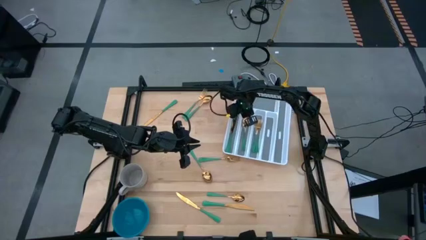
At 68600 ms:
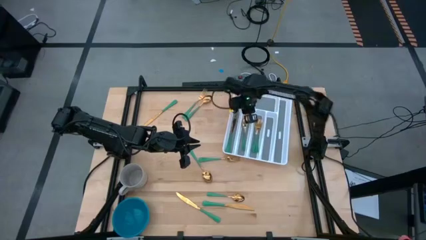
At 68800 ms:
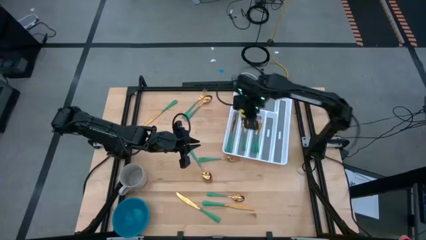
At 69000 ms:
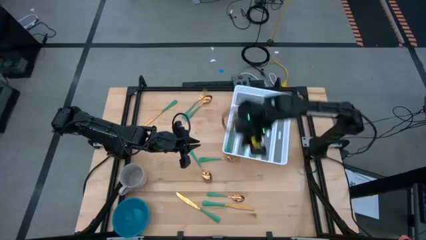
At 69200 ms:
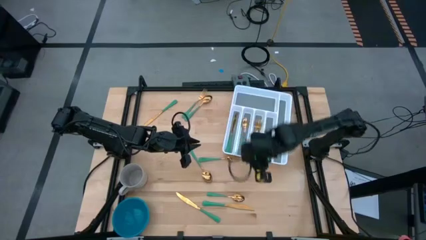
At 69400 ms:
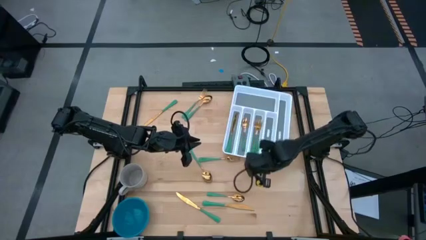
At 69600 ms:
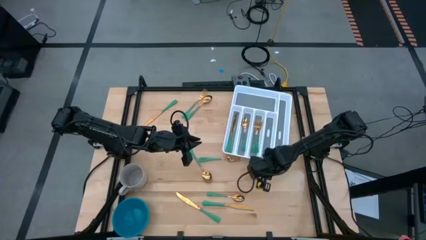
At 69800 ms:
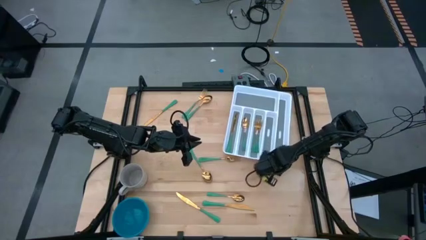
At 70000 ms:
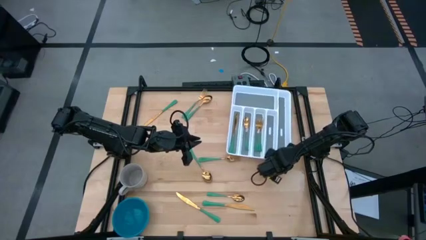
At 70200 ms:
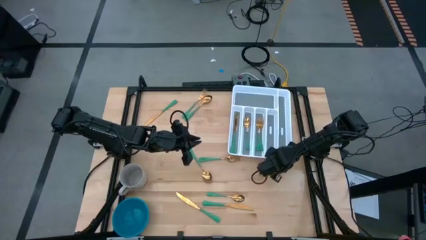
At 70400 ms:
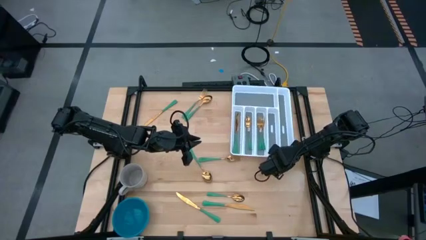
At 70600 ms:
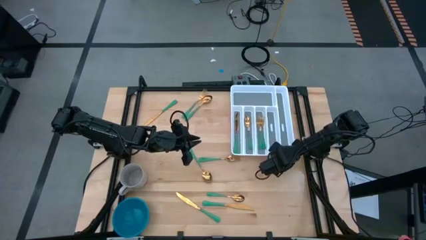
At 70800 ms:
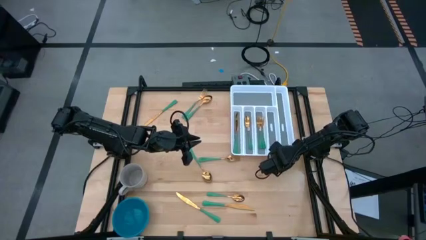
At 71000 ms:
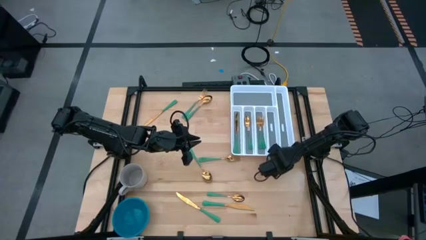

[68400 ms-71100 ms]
Task: Sort silverware
Adjust the white cutlery tray

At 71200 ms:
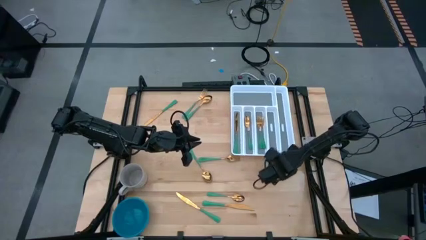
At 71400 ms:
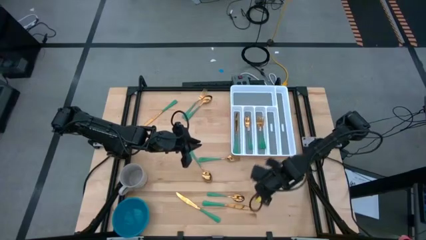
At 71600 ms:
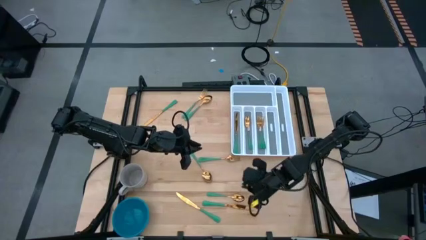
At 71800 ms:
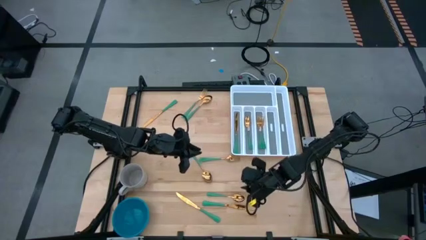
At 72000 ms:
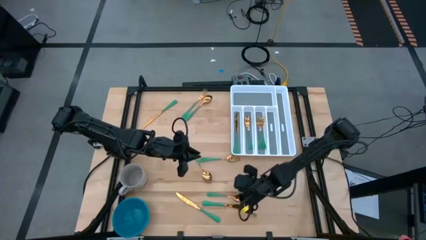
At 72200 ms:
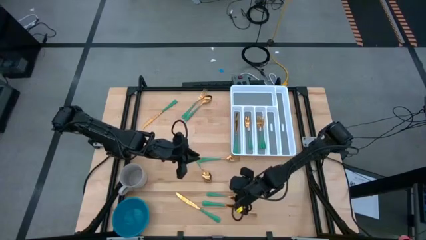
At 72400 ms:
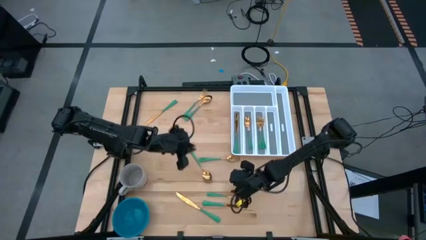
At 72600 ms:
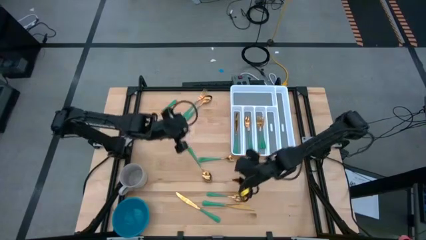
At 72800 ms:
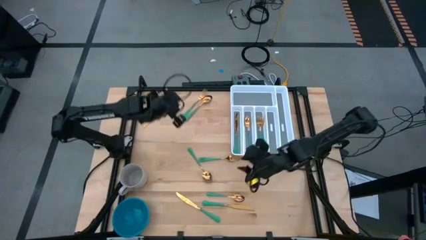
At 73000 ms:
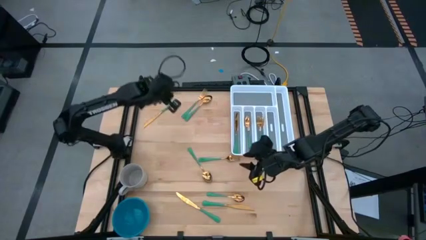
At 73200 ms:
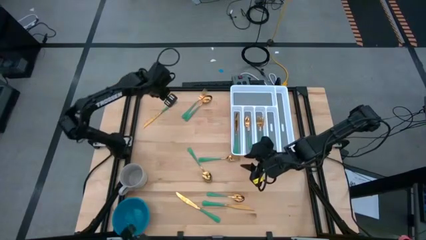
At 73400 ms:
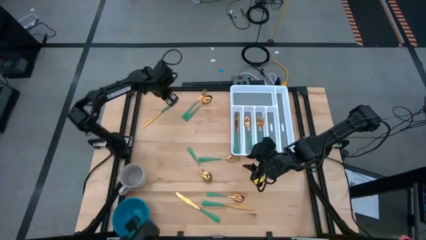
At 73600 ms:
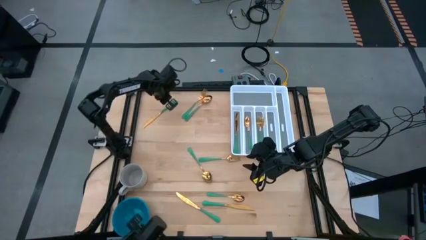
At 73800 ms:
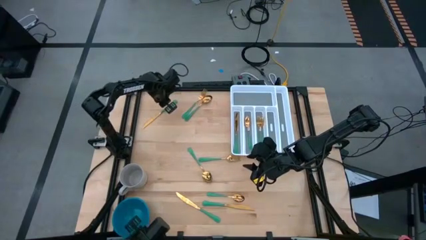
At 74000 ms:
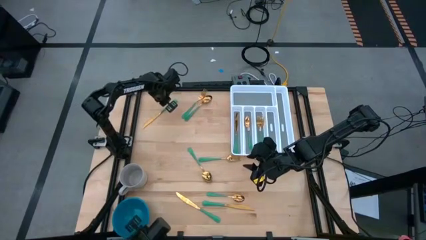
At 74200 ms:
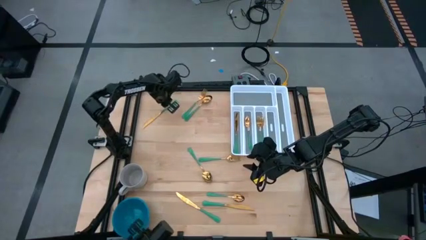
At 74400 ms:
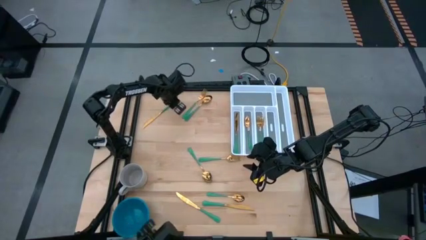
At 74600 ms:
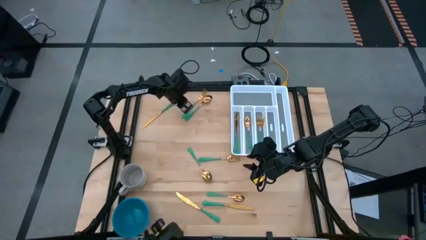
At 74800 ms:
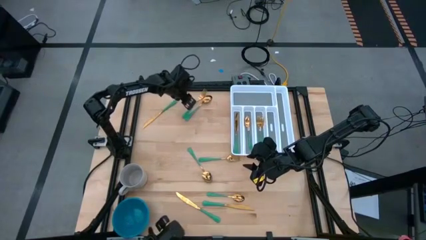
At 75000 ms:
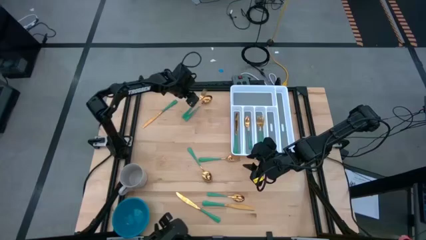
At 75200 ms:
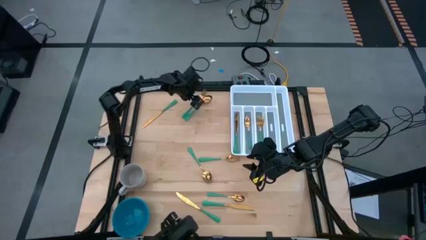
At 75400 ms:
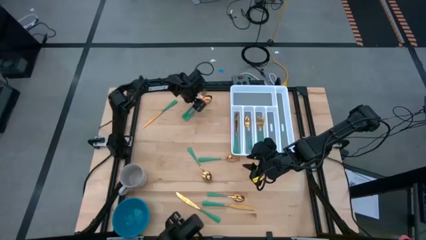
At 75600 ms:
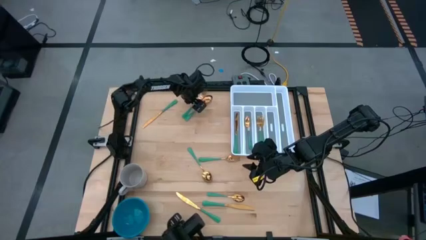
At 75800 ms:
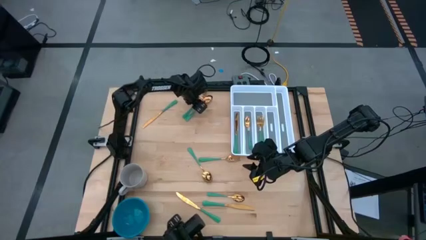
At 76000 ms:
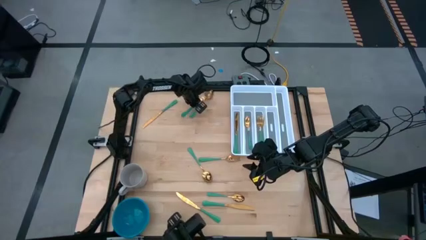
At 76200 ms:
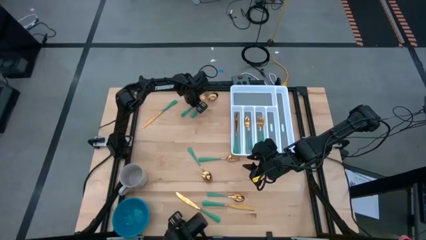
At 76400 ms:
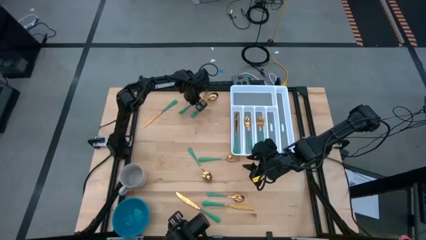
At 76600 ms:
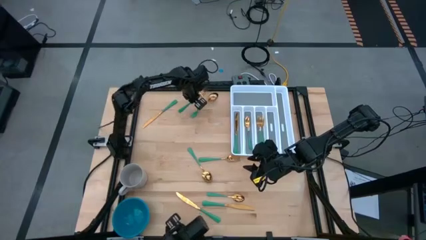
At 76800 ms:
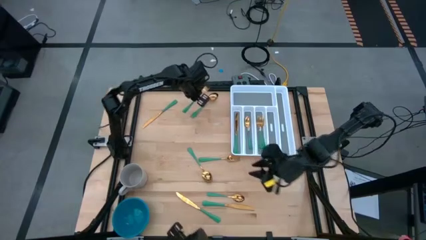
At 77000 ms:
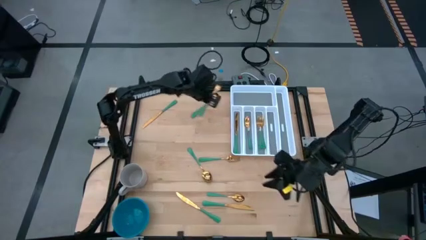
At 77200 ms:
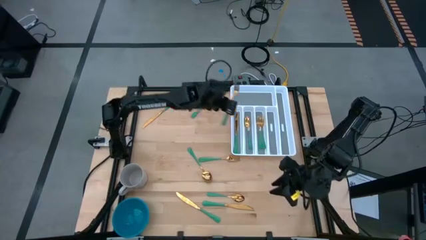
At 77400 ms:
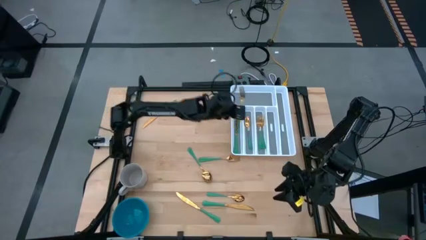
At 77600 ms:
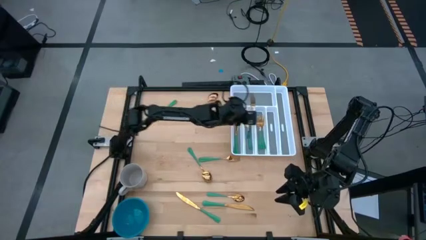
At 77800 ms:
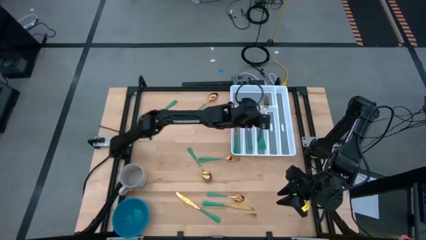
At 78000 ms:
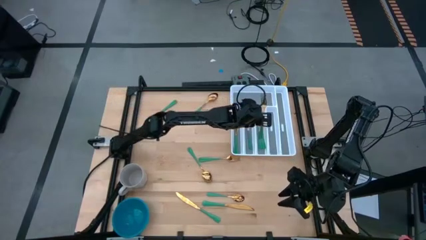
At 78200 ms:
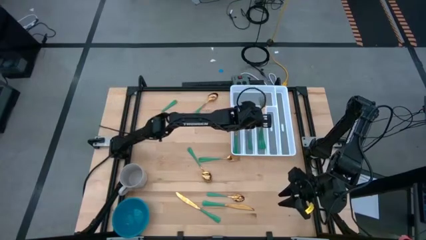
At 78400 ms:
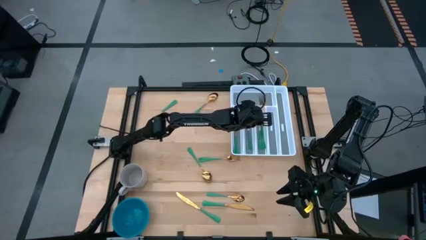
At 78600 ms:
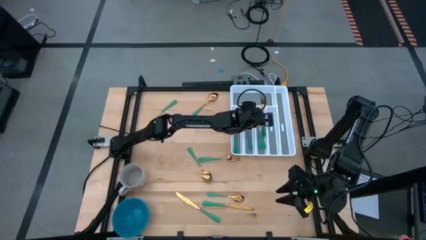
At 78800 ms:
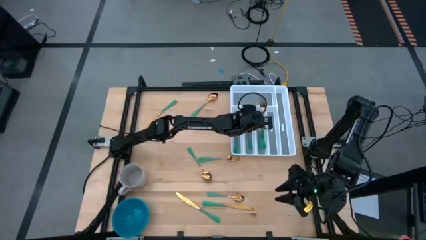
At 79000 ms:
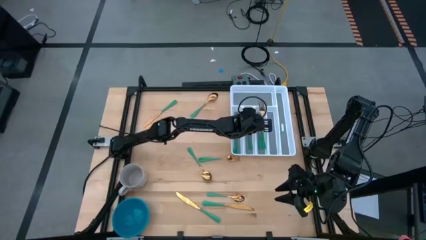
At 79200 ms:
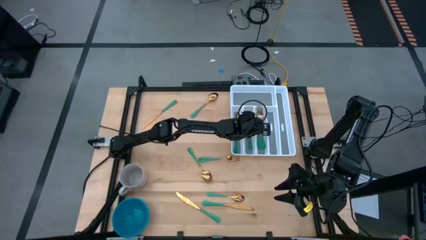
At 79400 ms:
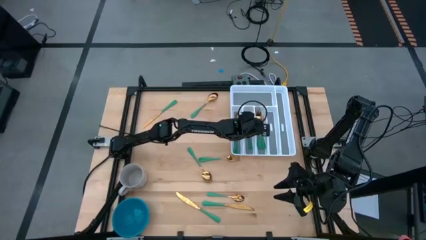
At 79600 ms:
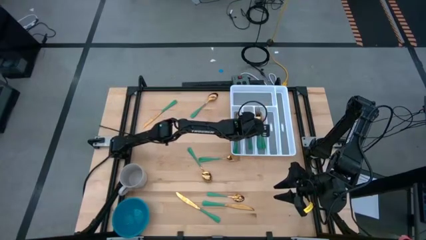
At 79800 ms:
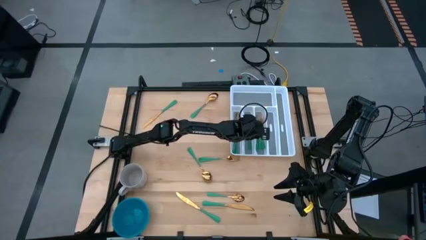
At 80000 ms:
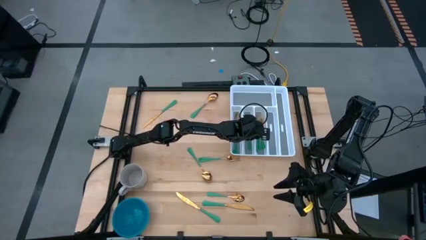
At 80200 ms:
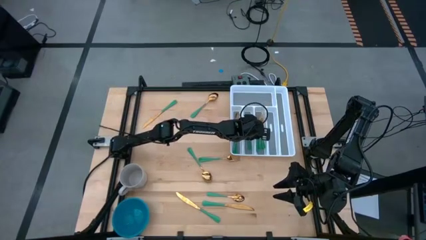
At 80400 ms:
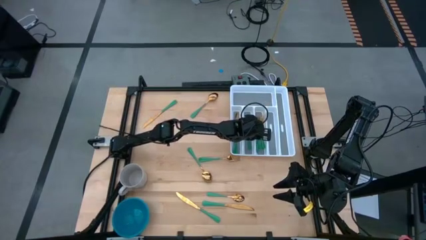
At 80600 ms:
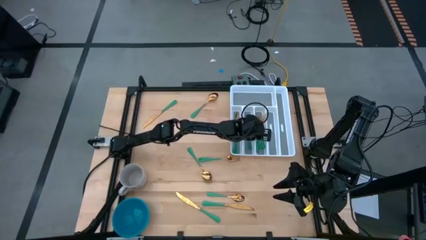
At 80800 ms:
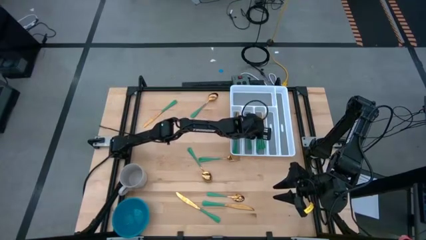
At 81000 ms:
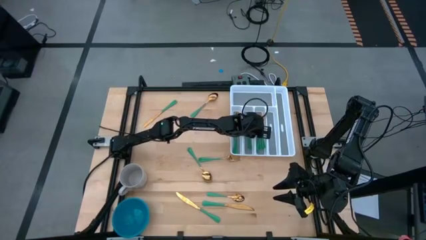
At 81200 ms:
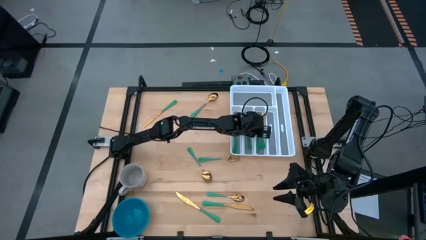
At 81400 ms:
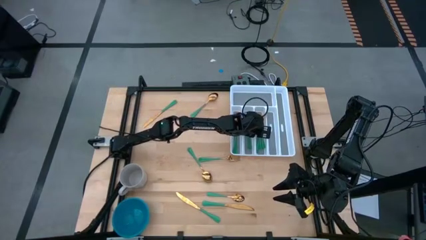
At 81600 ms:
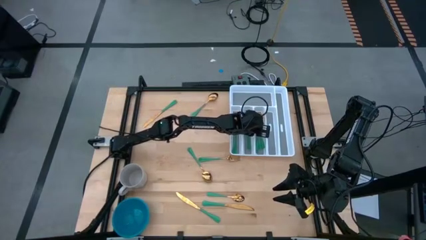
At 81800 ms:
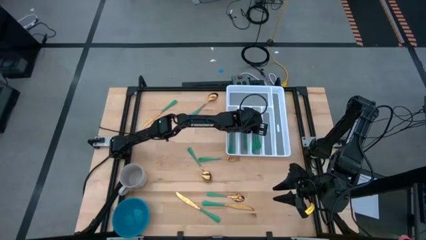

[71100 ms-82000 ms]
Put the top green fork into the white cutlery tray
